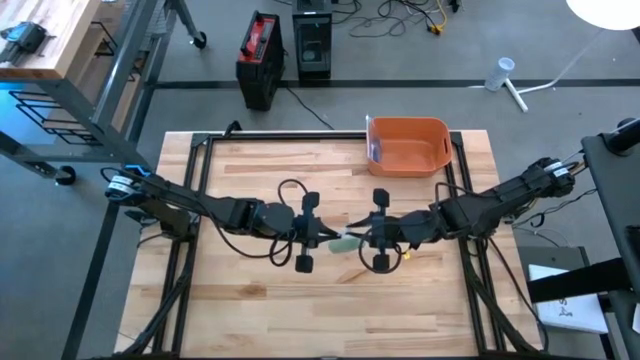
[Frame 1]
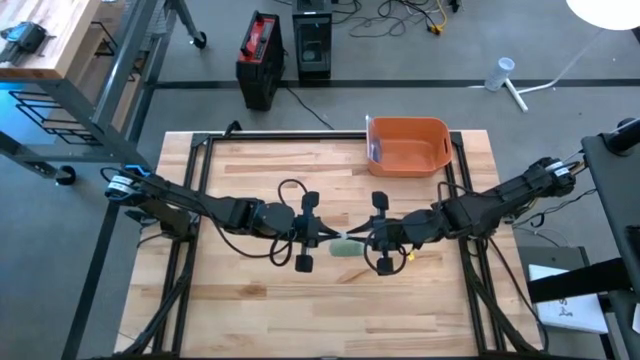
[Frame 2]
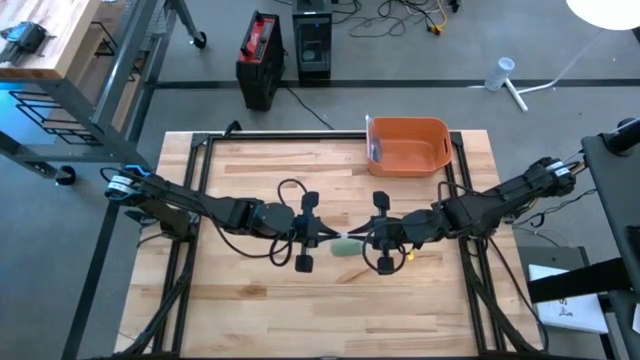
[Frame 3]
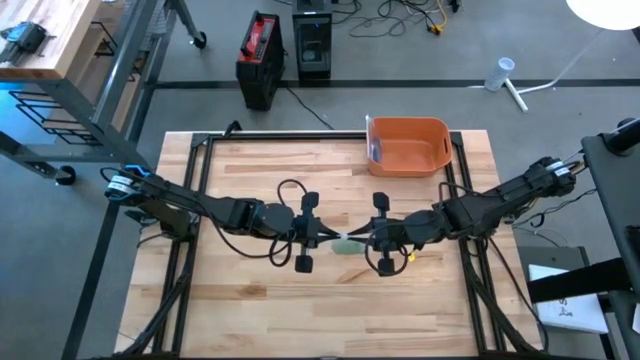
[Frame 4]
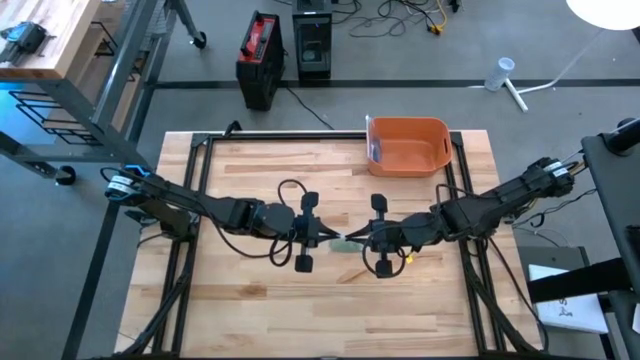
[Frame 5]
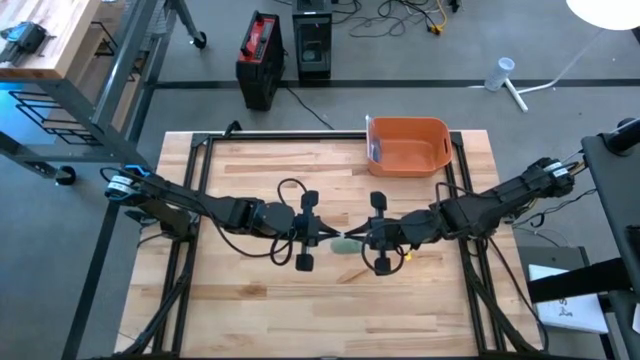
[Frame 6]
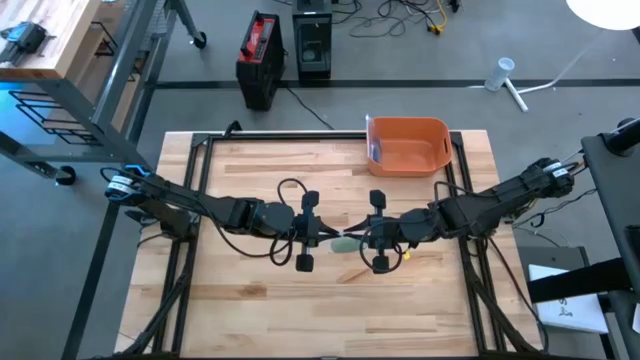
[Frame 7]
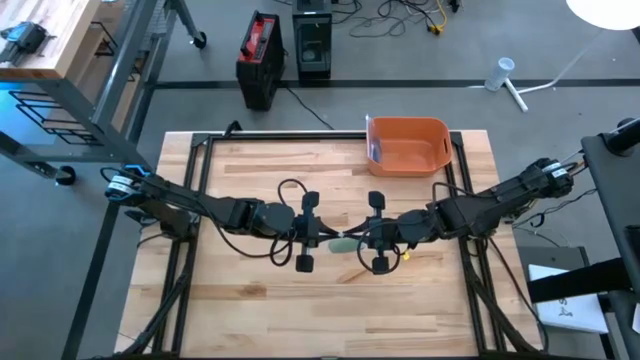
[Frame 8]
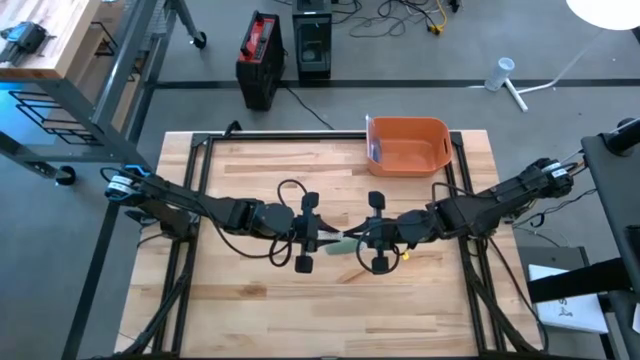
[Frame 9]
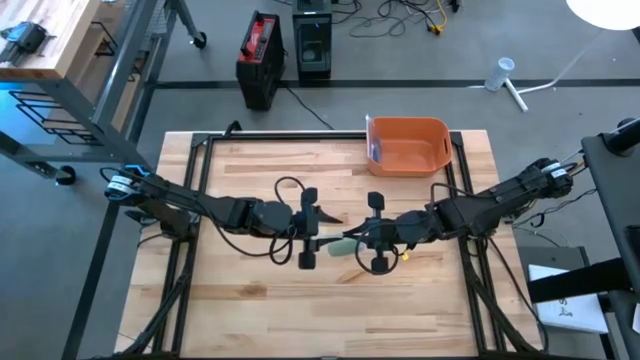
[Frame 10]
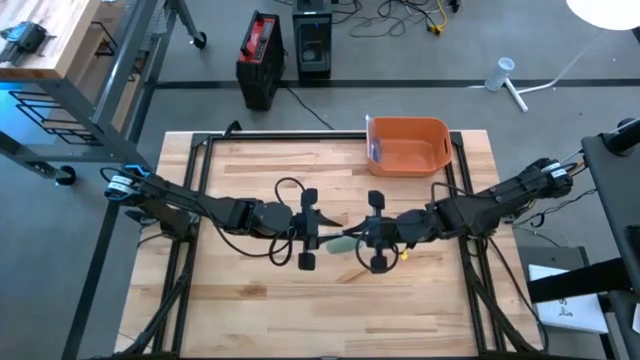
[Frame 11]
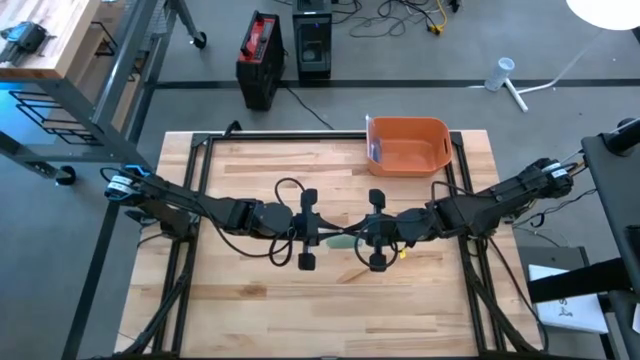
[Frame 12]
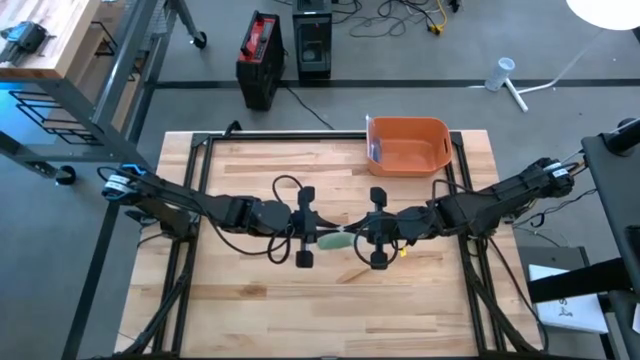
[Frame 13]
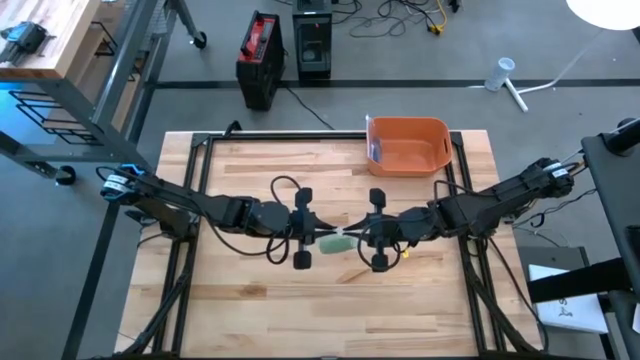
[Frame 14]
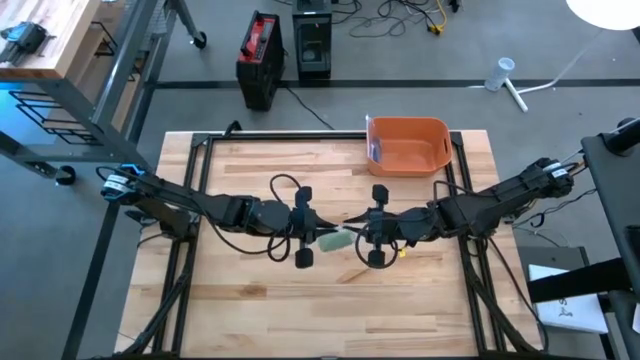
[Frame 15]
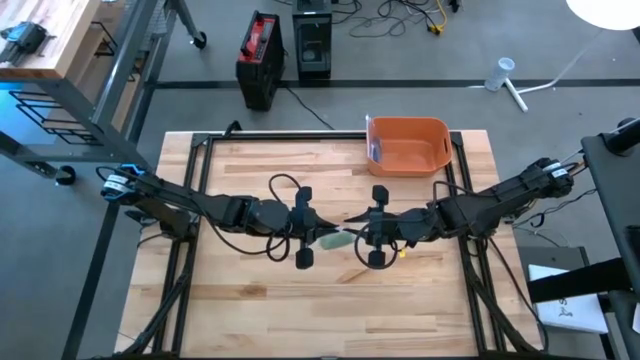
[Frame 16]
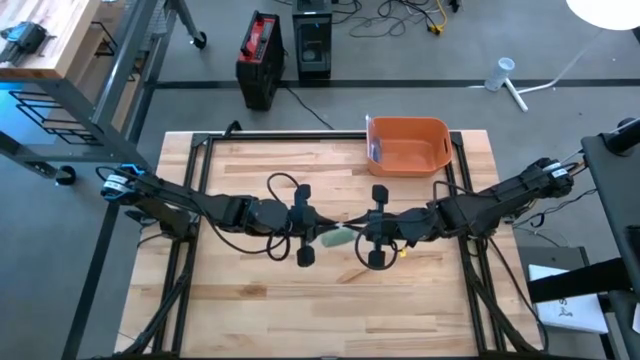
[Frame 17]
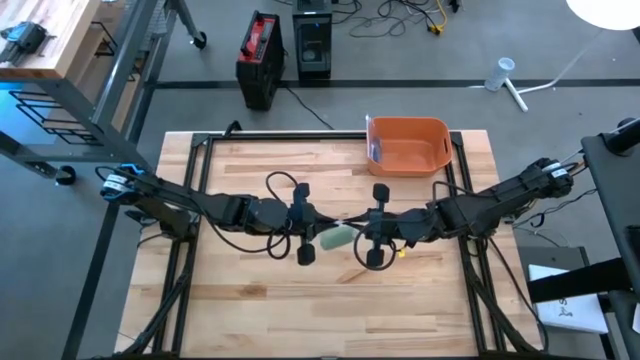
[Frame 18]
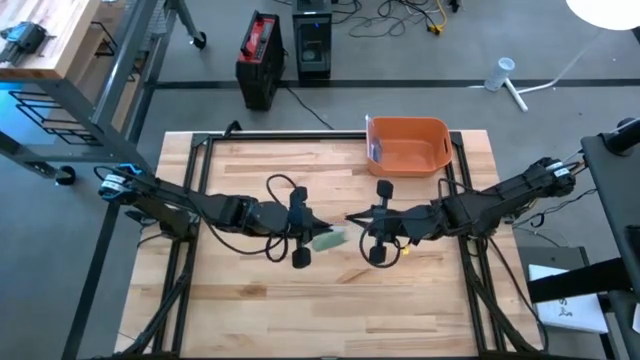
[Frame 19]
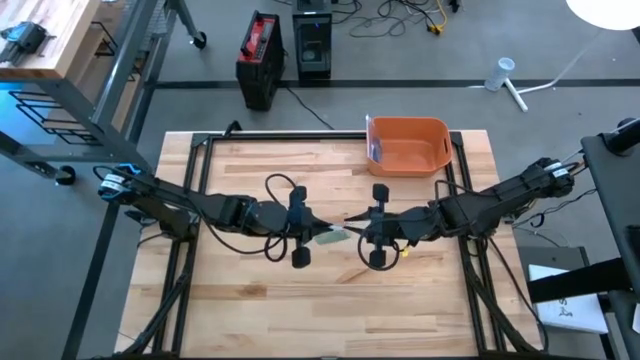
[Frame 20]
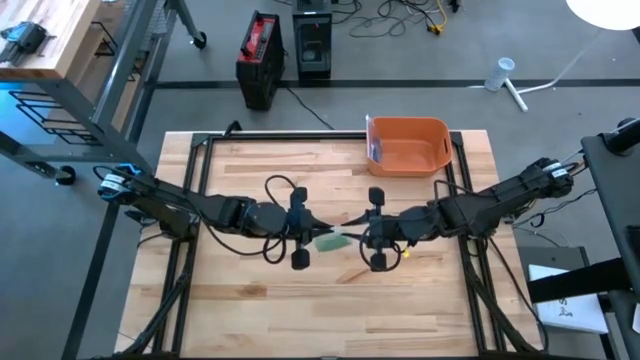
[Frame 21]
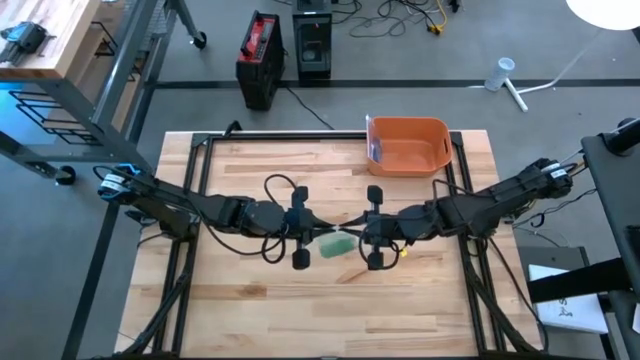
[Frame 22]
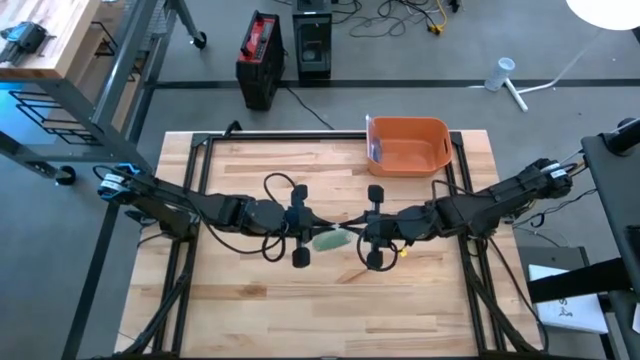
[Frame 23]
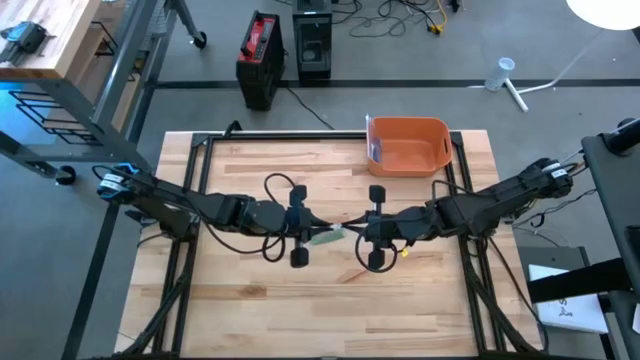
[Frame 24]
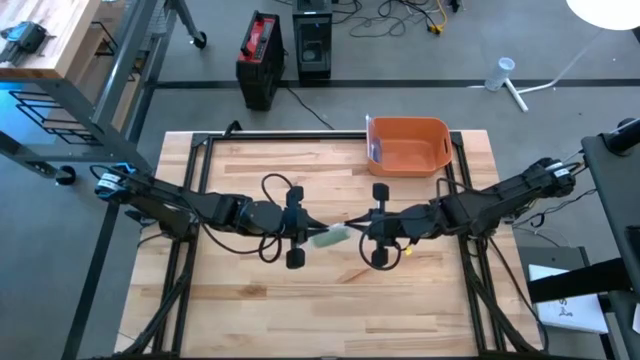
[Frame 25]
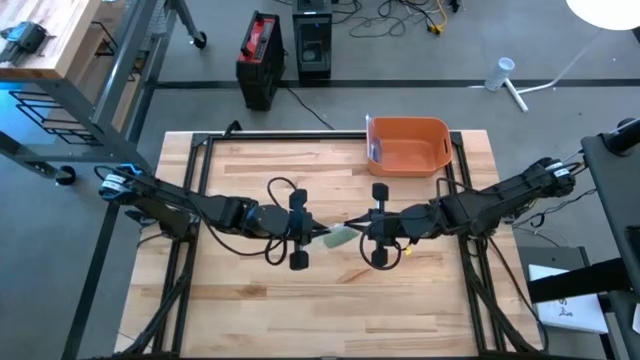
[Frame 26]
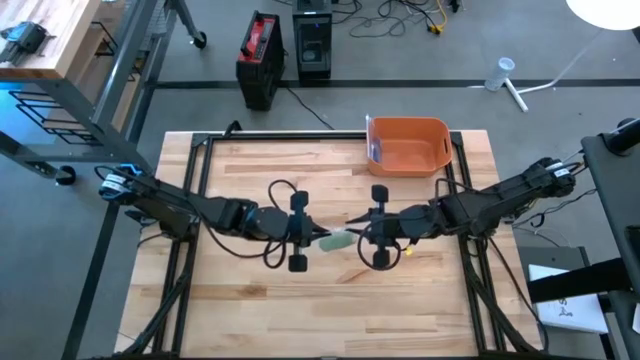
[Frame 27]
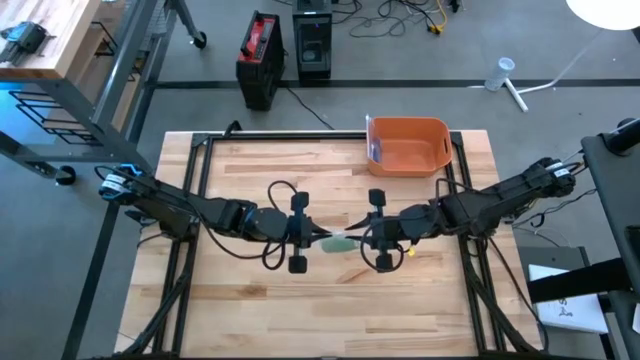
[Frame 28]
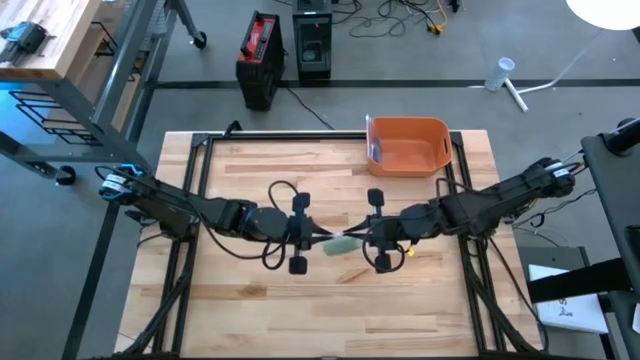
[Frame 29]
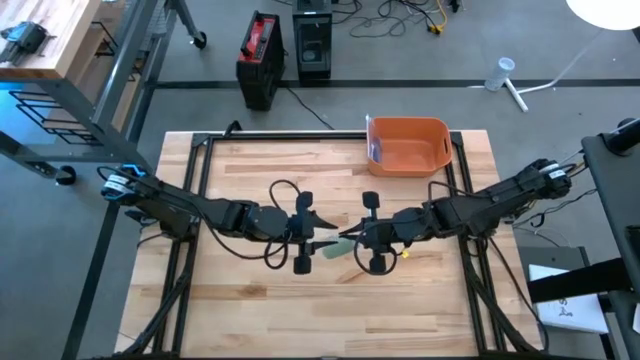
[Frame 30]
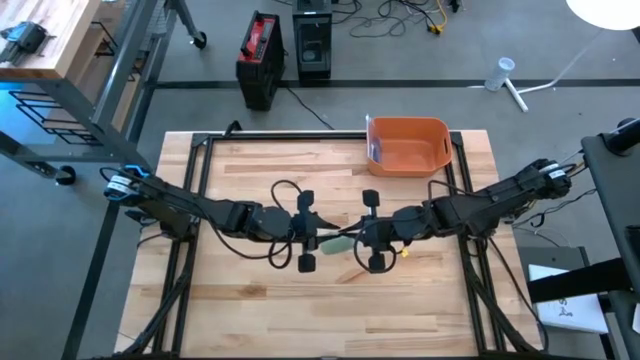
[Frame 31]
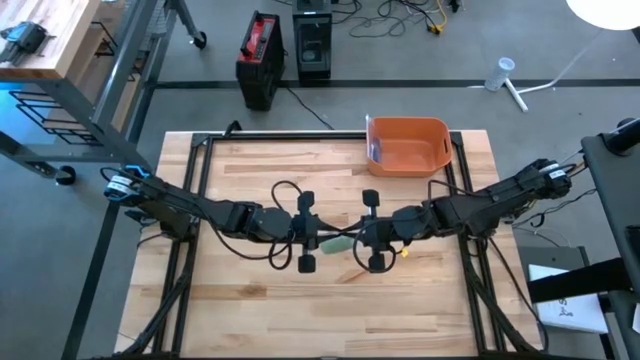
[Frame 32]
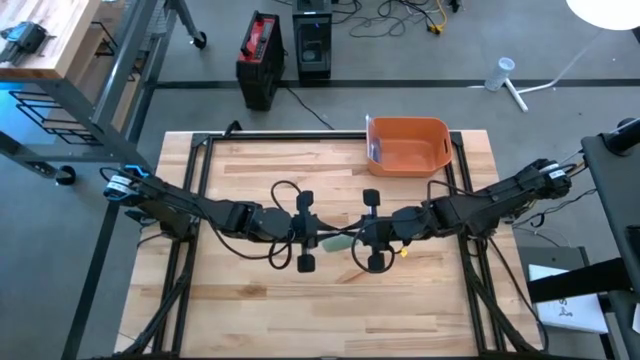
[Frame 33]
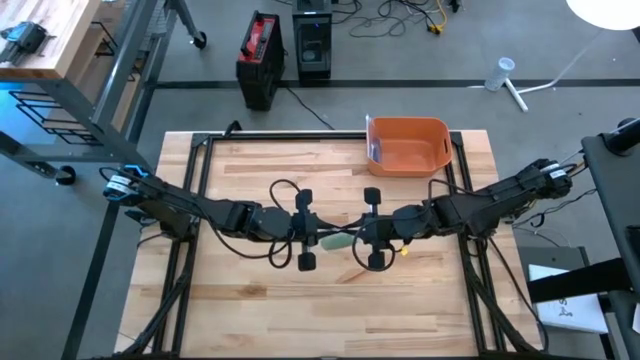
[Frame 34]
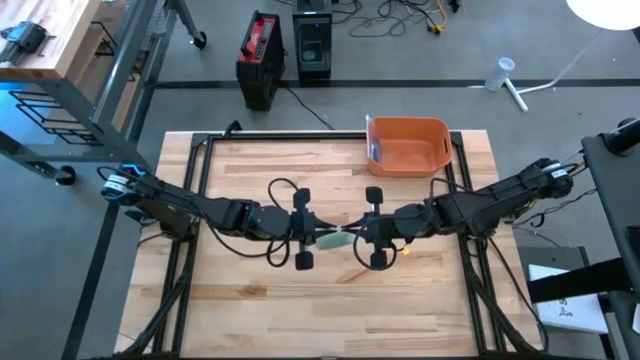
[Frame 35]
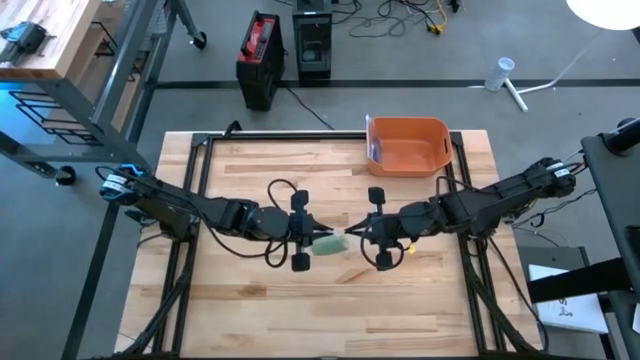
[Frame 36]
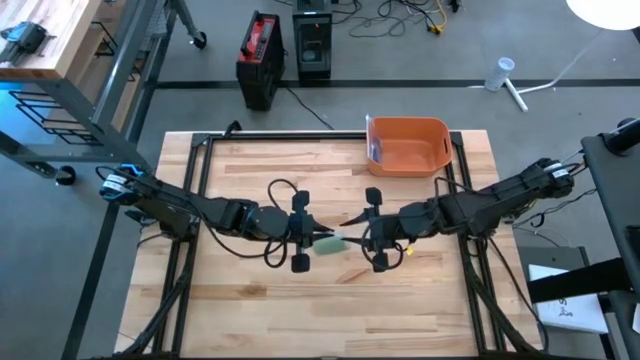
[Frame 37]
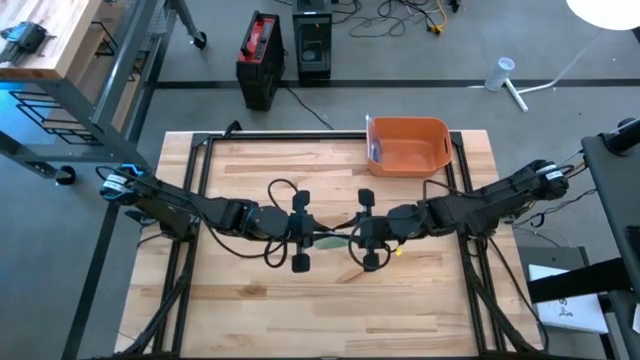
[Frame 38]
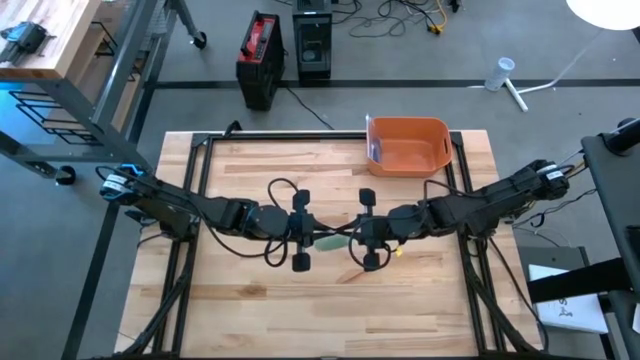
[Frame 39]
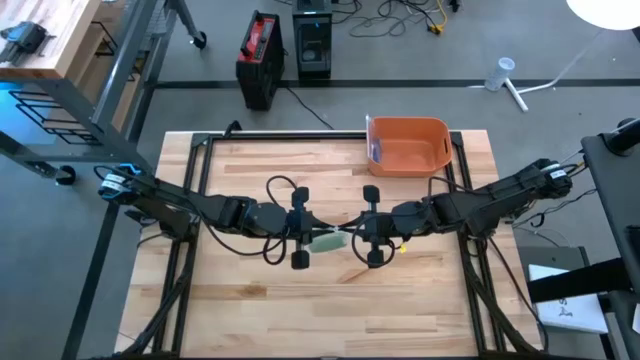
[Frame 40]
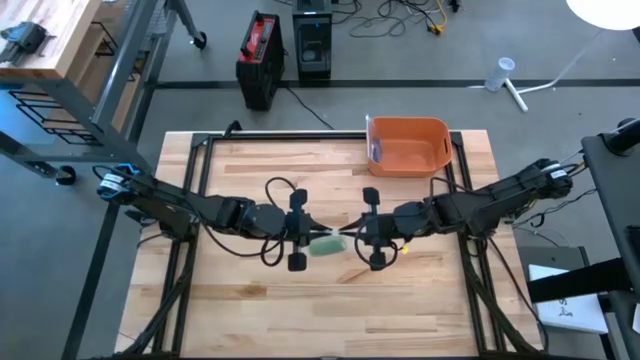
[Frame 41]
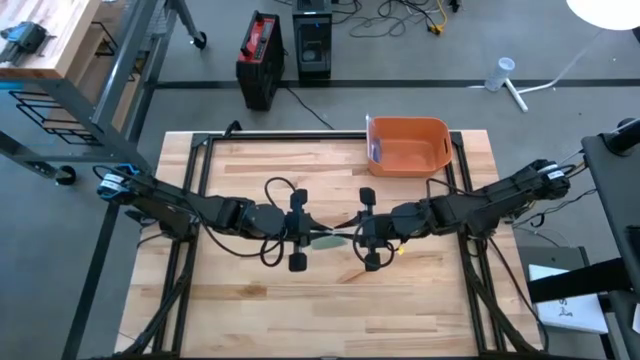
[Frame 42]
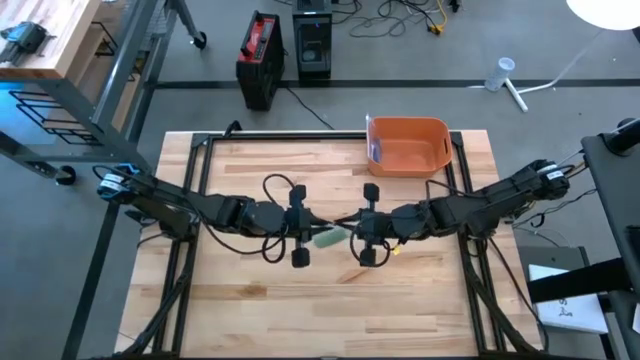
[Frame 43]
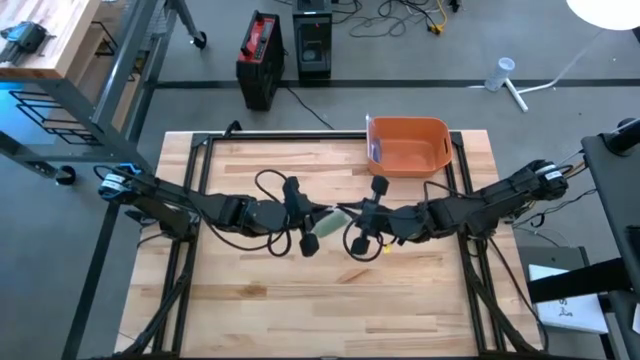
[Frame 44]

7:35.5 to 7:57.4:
Task: Roll bandage
Close the transparent zip bag
